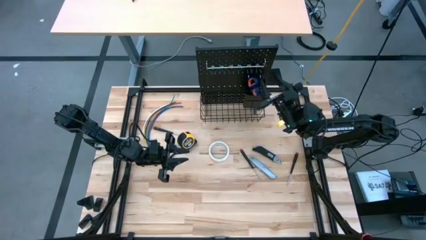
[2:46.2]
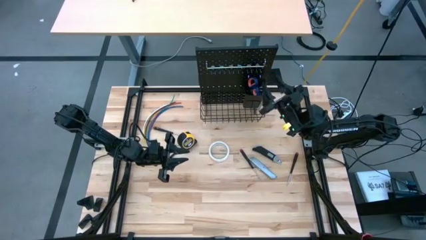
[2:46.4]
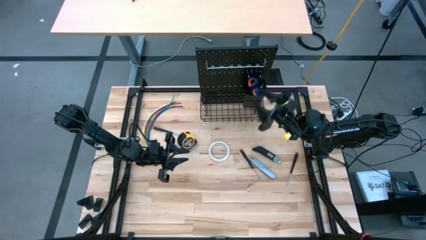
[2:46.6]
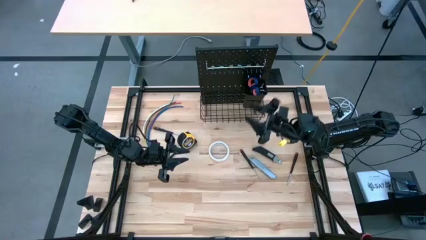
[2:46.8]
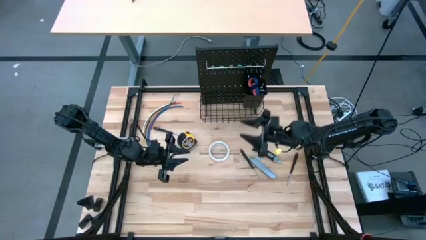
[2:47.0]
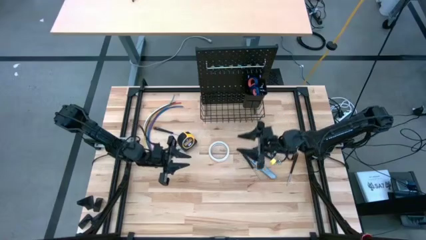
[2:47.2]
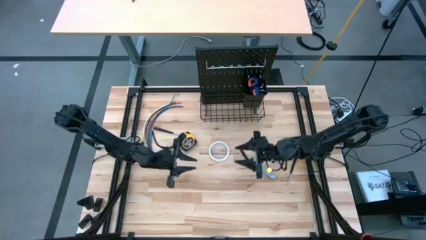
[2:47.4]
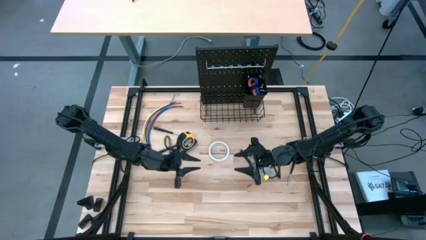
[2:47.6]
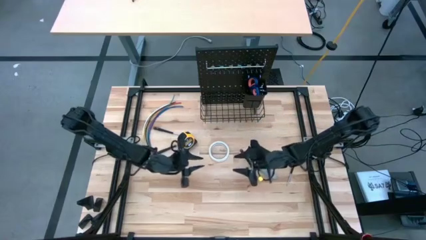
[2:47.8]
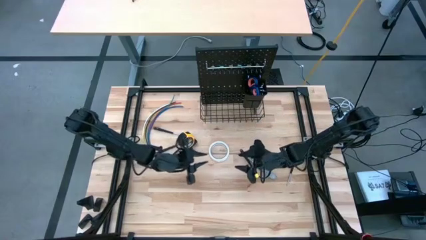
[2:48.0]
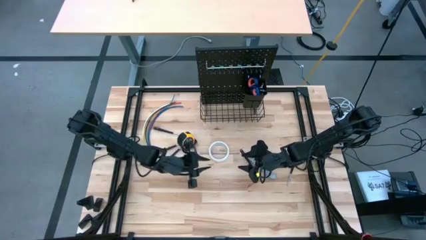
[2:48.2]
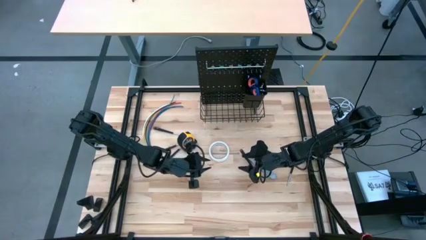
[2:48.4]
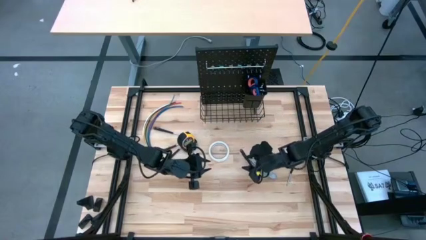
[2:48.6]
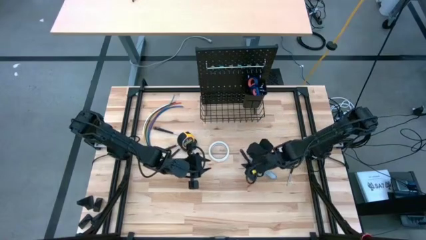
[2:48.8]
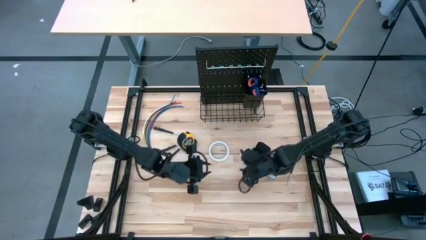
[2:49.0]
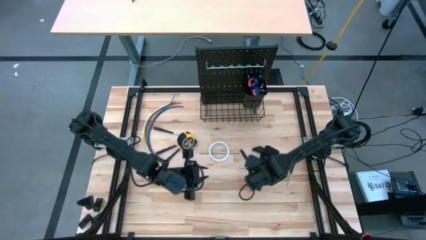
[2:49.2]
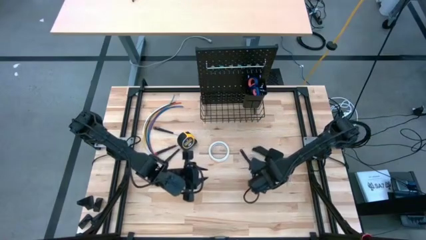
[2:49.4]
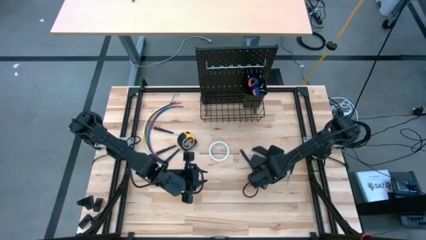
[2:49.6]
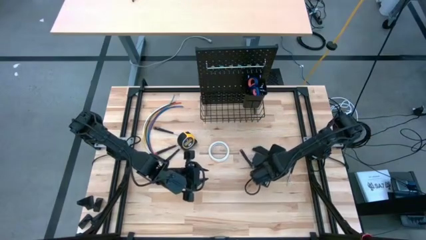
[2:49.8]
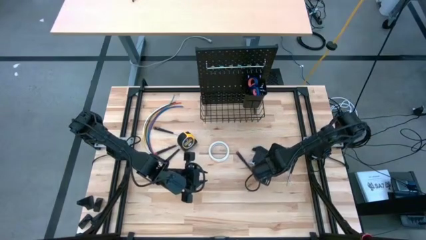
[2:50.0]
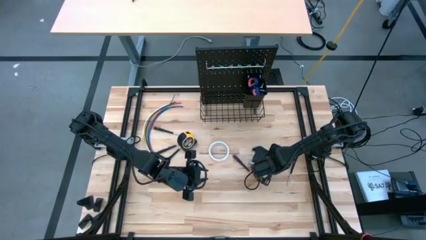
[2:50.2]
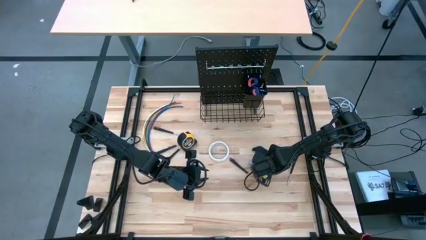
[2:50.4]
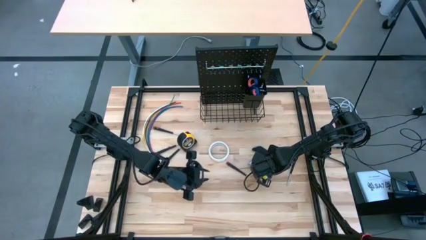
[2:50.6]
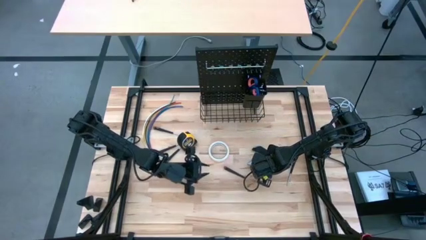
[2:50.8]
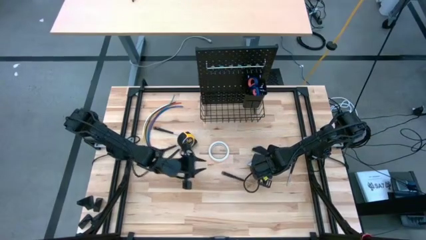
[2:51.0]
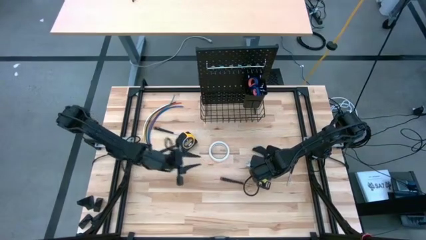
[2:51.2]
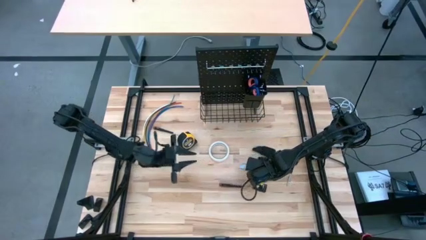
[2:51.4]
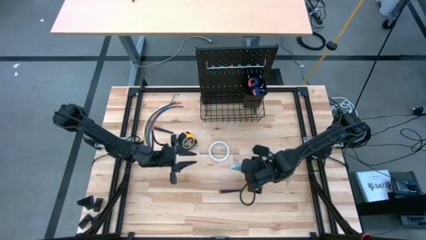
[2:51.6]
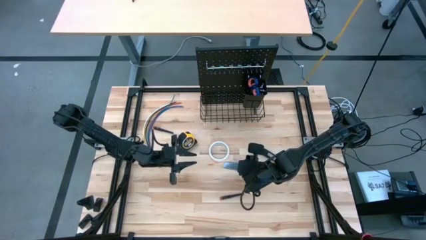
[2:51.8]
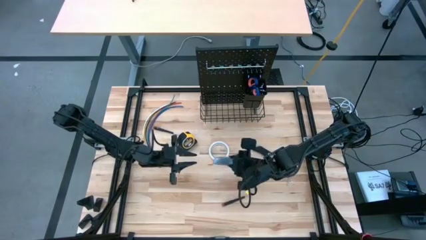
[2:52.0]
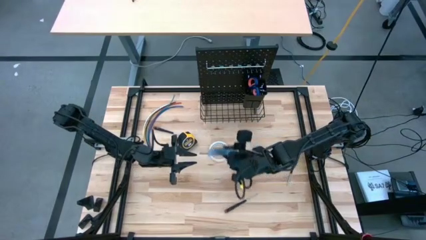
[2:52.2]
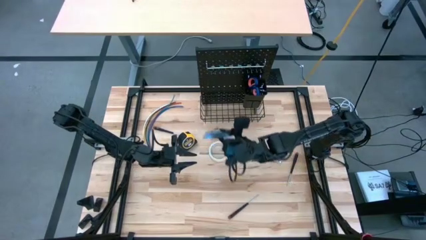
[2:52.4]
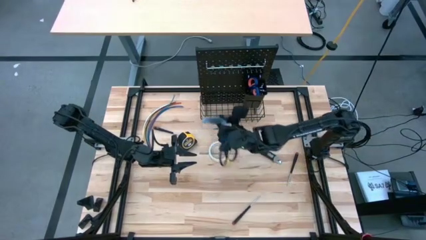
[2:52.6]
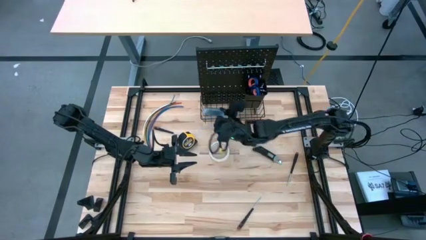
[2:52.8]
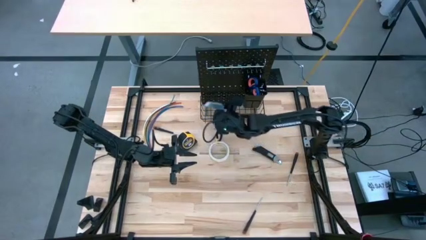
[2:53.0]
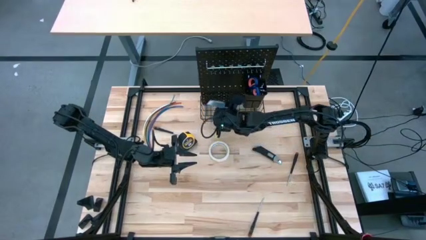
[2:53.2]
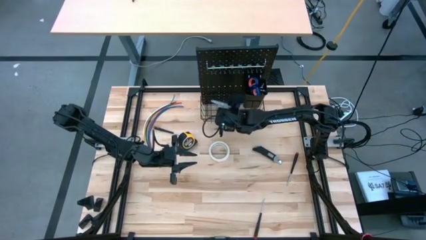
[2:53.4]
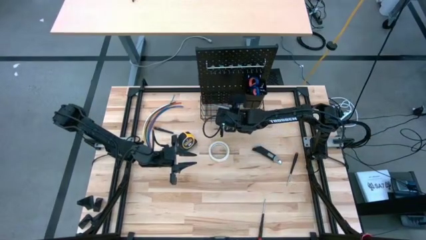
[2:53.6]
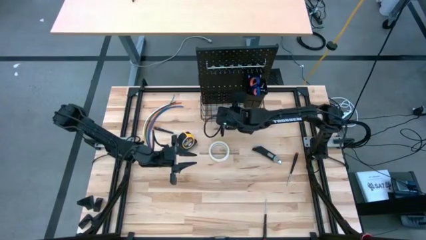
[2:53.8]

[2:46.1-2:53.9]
Task: Hang tools onto peg board
Put the silver cutter into the black wire basket on the peg board

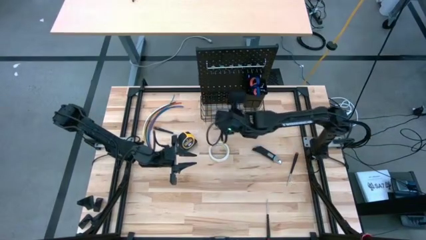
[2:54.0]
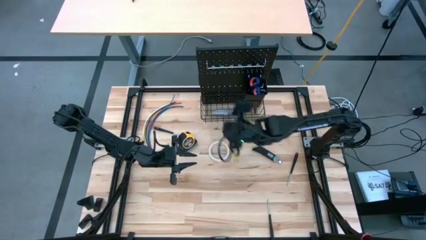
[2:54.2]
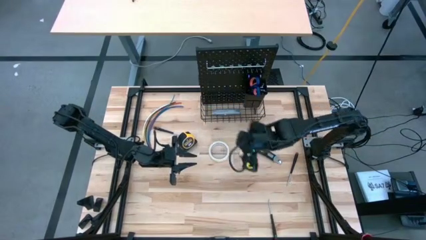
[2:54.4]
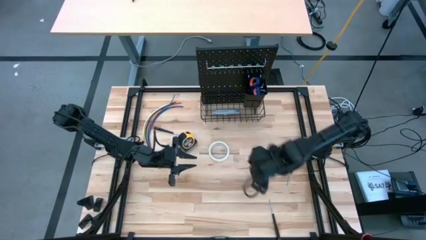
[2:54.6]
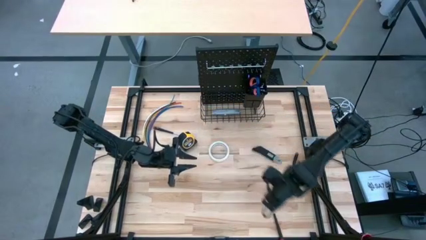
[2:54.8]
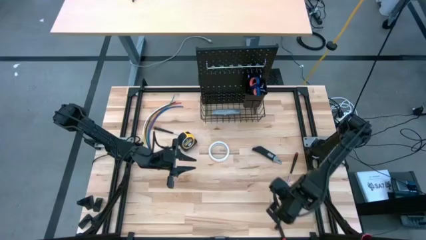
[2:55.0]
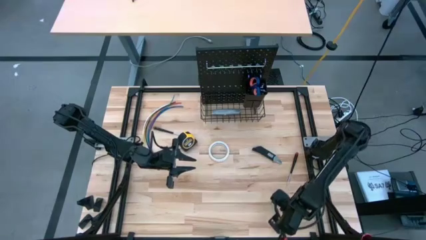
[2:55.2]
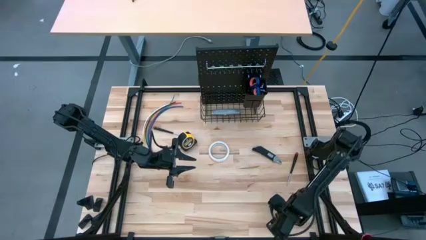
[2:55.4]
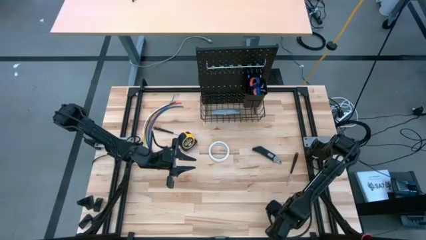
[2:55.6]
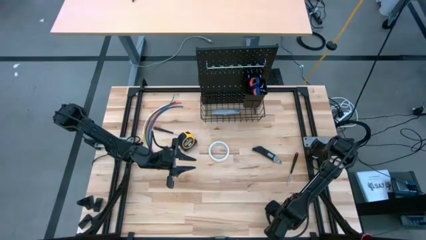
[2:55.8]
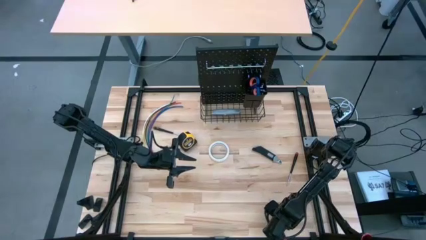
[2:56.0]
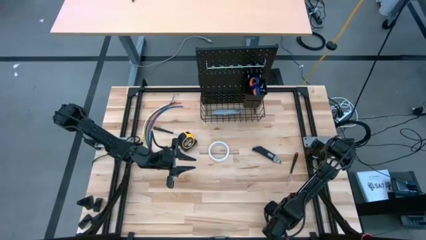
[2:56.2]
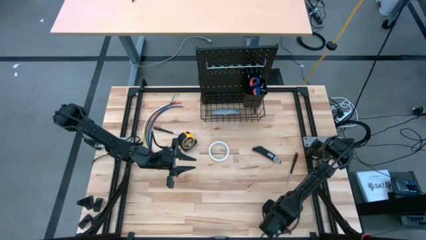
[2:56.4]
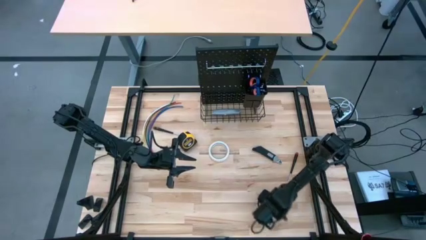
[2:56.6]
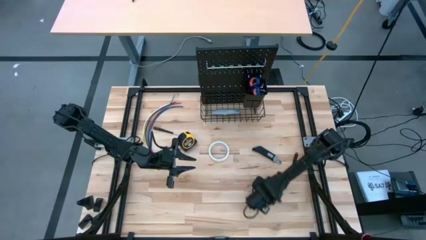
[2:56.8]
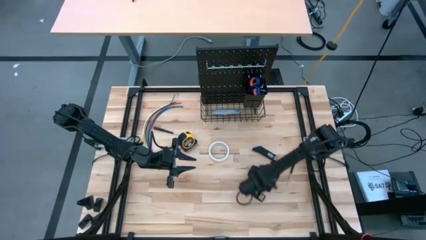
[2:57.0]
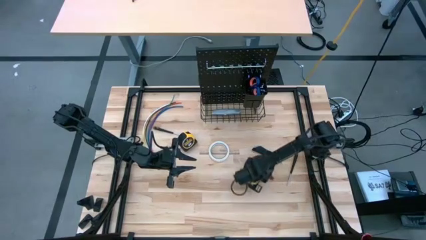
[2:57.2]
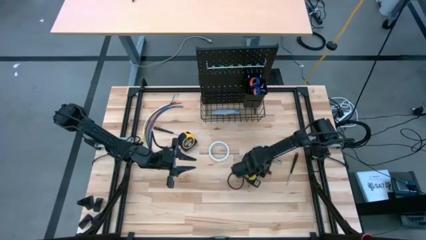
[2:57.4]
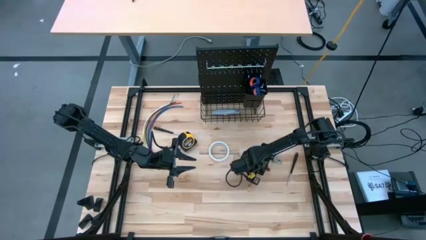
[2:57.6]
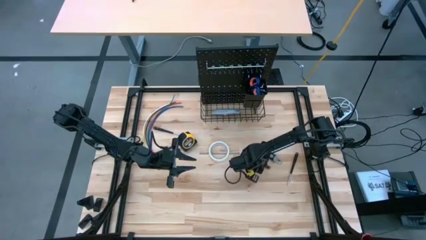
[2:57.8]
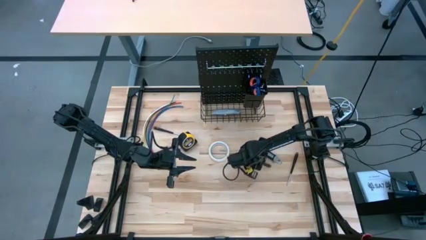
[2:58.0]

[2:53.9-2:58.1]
Move the black screwdriver to the middle of the table

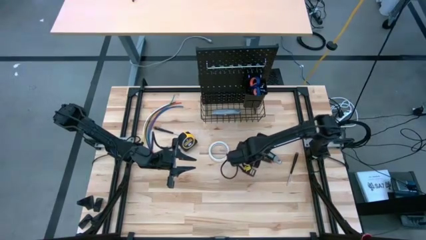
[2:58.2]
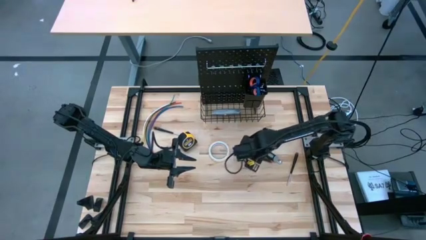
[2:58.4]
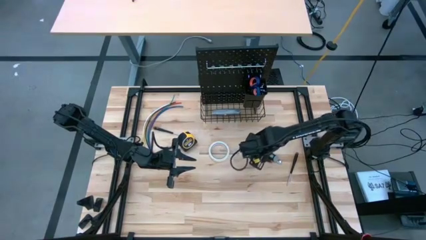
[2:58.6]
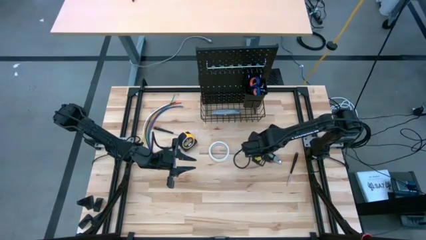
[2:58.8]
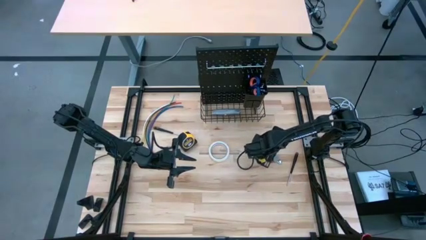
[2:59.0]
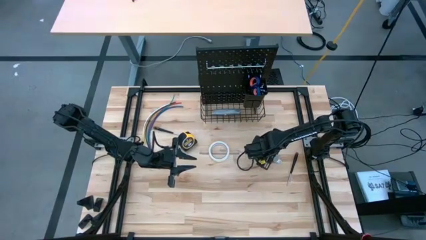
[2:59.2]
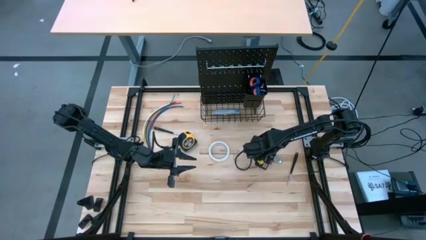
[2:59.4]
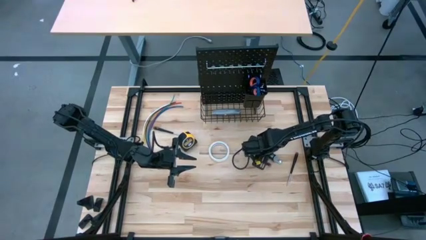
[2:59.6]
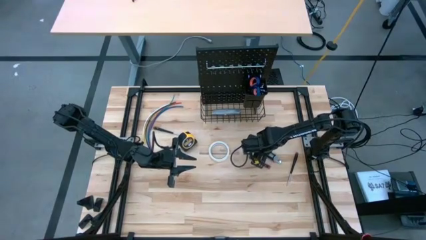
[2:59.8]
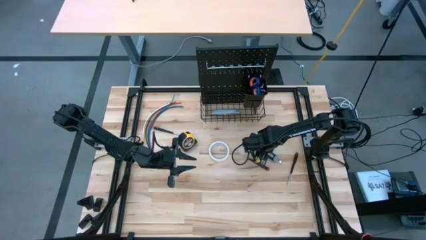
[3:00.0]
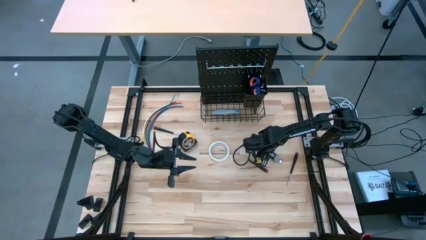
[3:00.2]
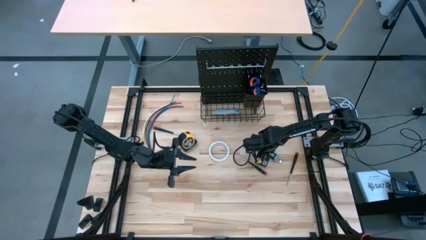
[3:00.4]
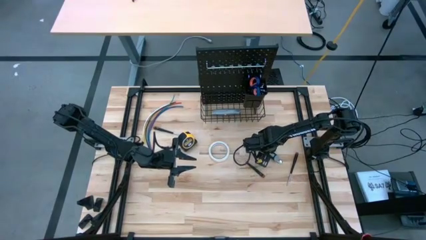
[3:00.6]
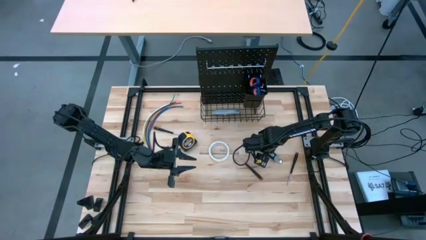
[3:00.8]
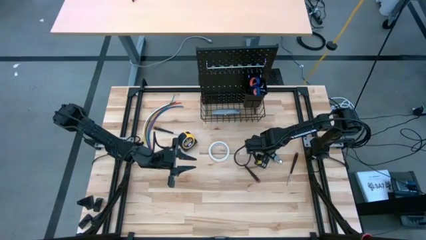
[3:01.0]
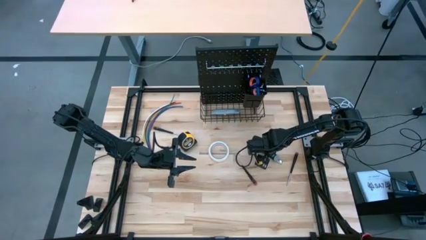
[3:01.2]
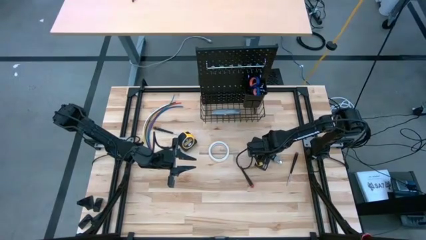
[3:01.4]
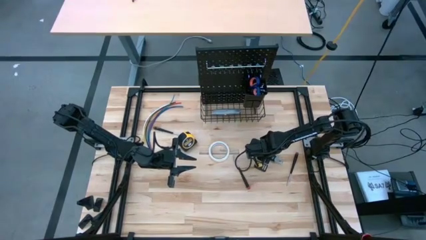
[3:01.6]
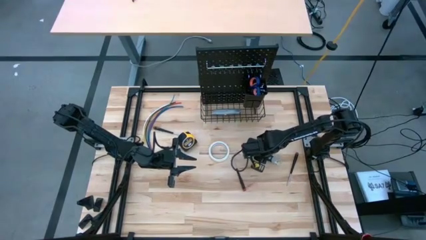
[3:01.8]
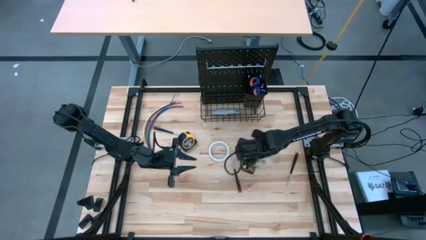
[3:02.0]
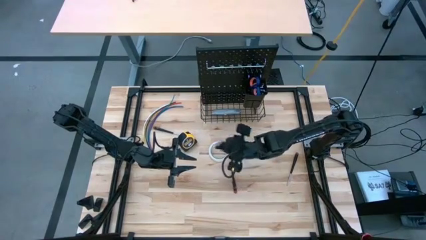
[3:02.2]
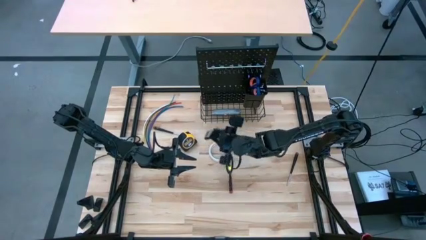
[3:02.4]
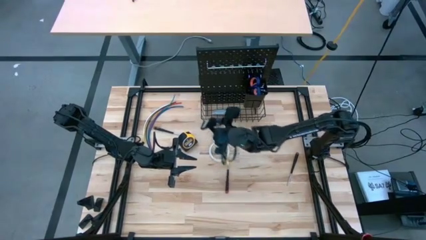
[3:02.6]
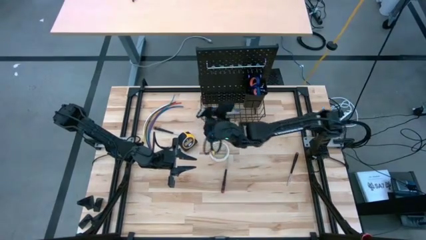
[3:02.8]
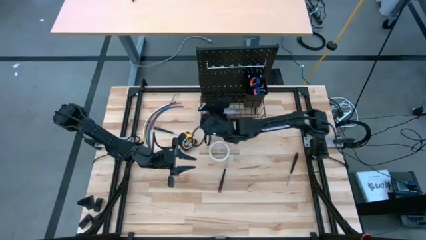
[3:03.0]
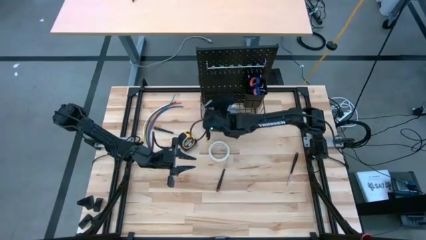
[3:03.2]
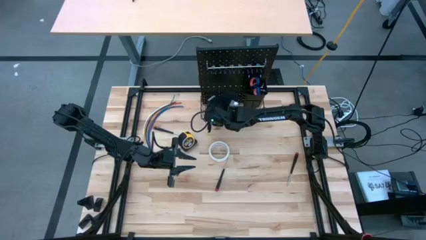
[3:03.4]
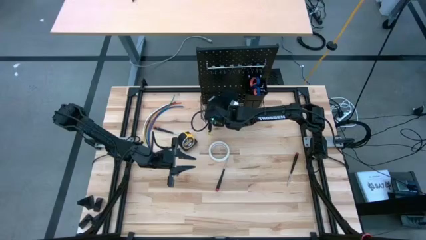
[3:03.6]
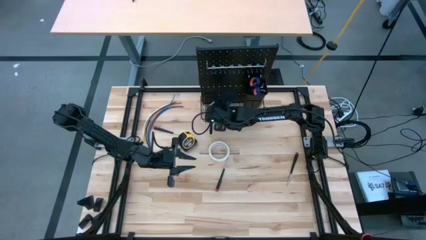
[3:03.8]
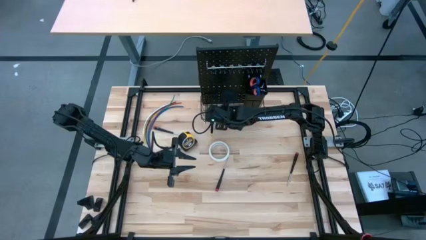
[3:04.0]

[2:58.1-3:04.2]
Put the black cutter into the black wire basket on the peg board
